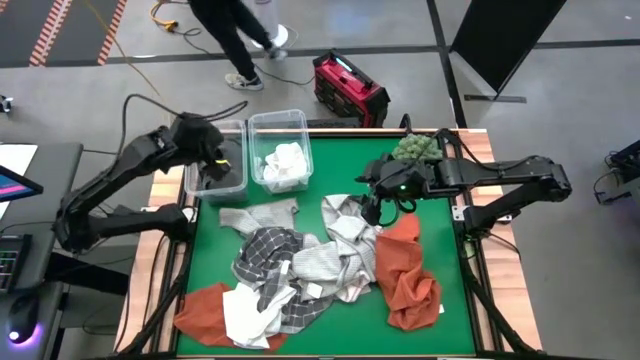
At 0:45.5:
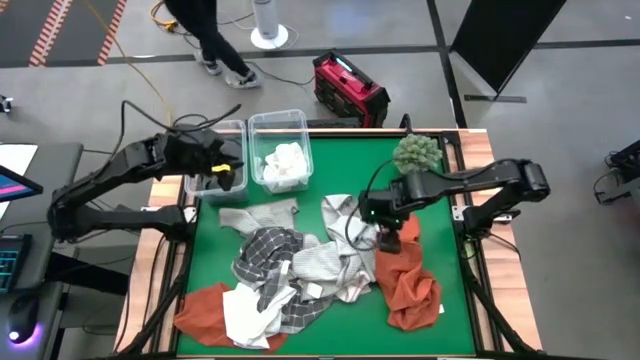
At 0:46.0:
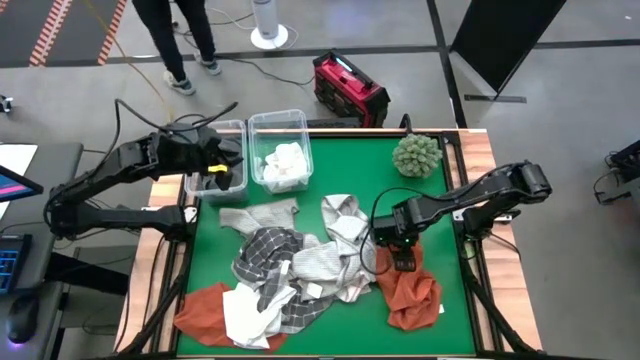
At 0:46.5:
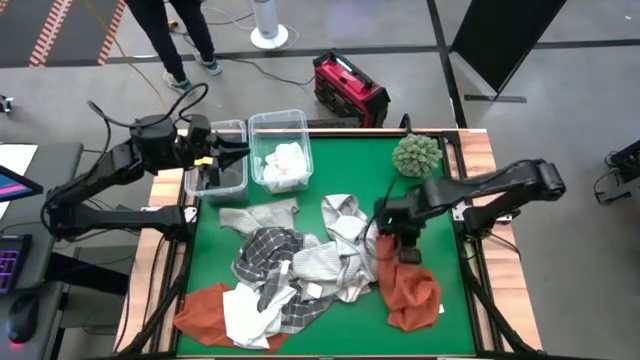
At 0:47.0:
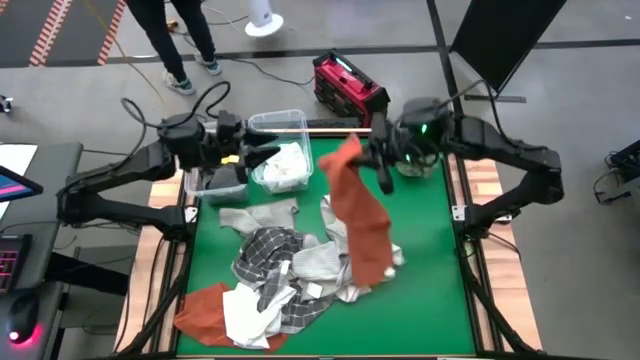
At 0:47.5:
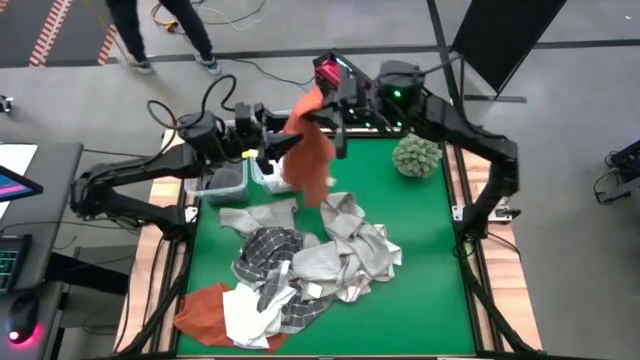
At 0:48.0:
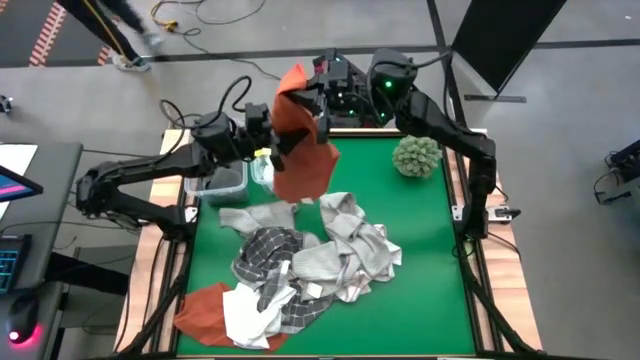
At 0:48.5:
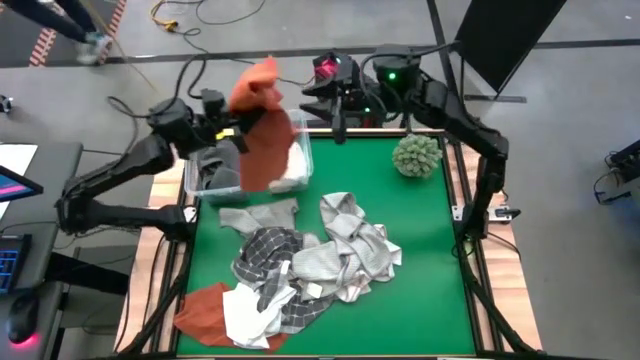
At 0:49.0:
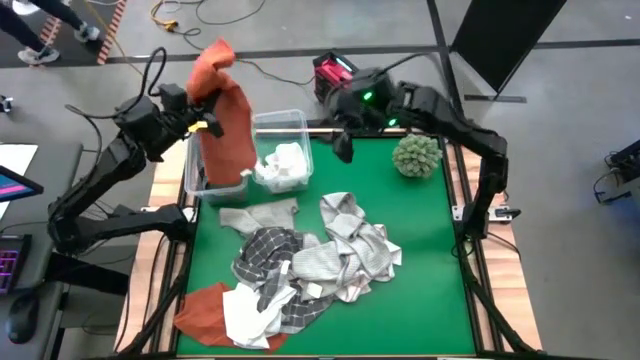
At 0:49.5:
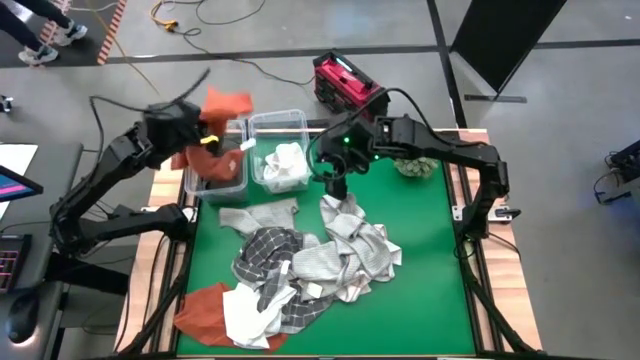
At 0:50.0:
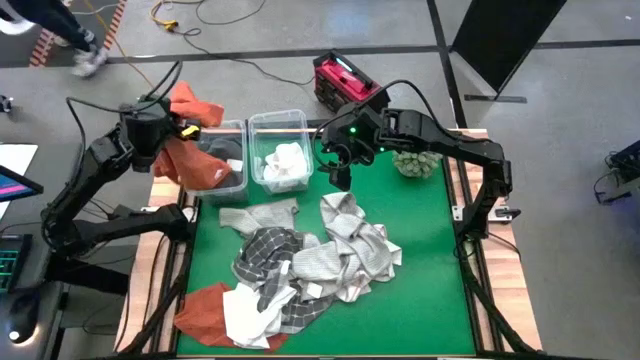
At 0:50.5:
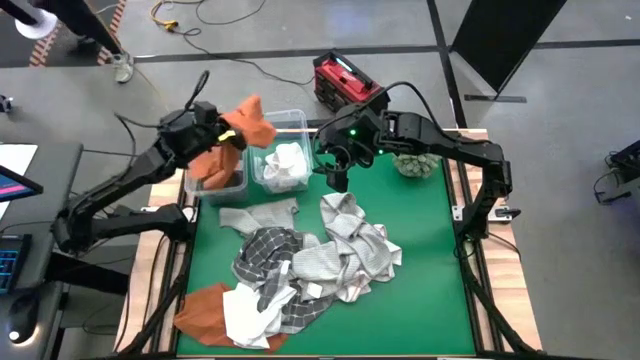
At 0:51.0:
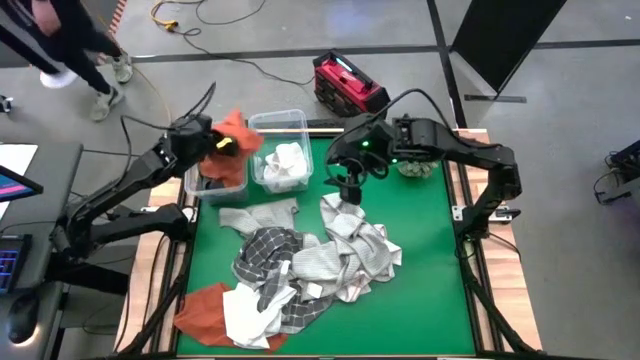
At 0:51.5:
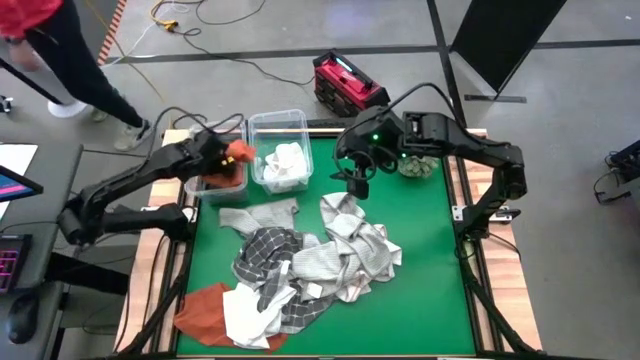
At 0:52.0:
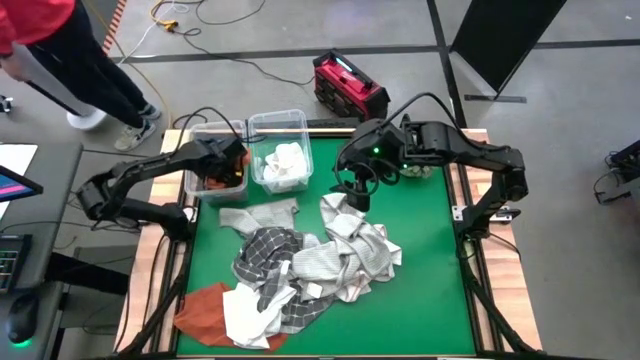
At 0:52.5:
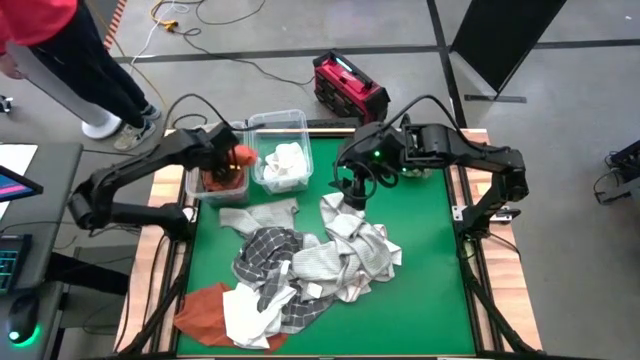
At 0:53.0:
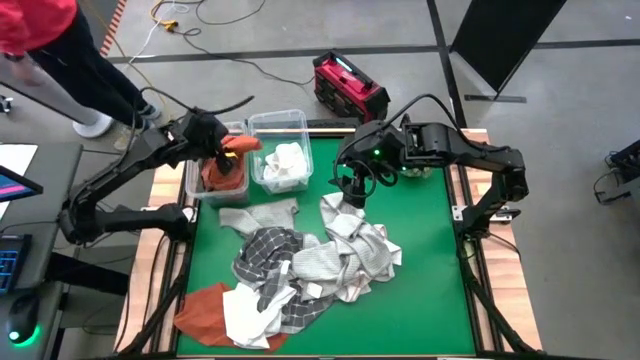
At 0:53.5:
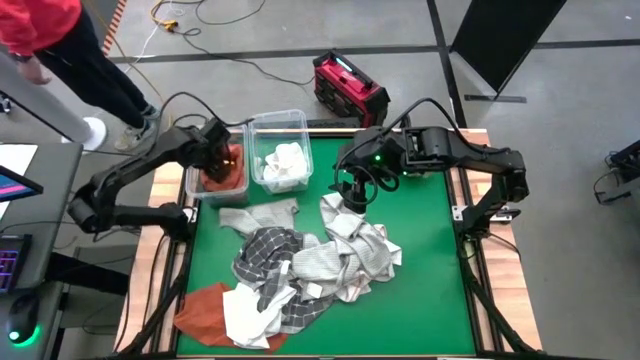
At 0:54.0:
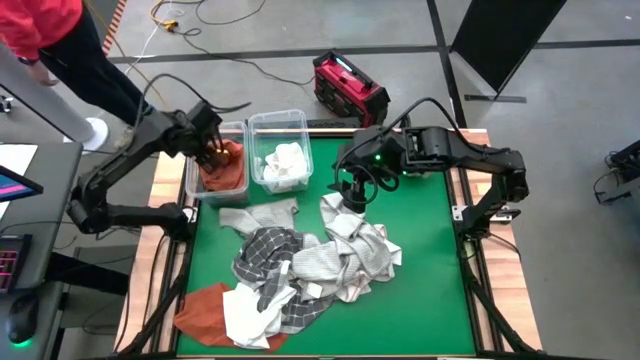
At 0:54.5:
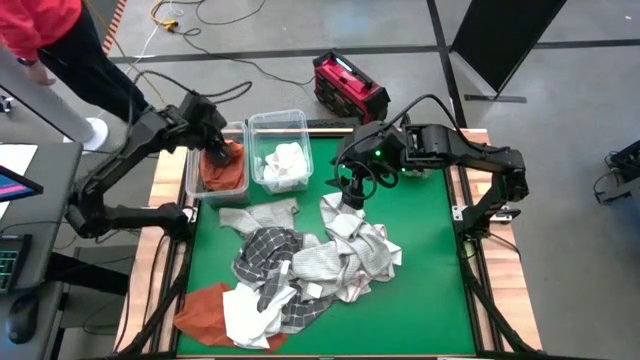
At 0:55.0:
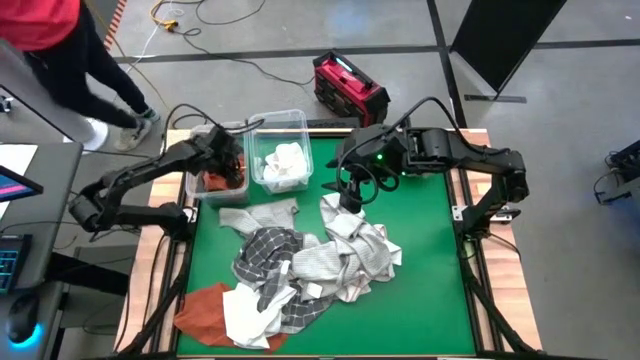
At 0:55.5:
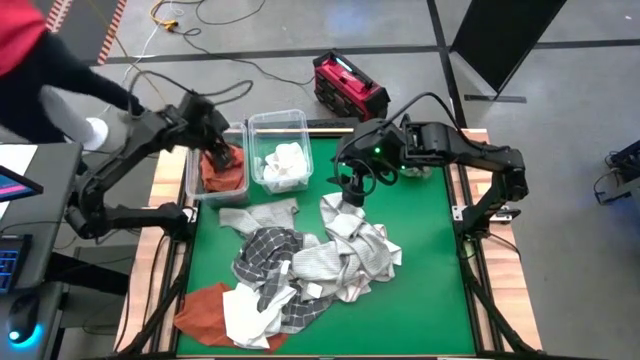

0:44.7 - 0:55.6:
Task: Sort towels by color in basket
Put the orange towel into the left transparent bin

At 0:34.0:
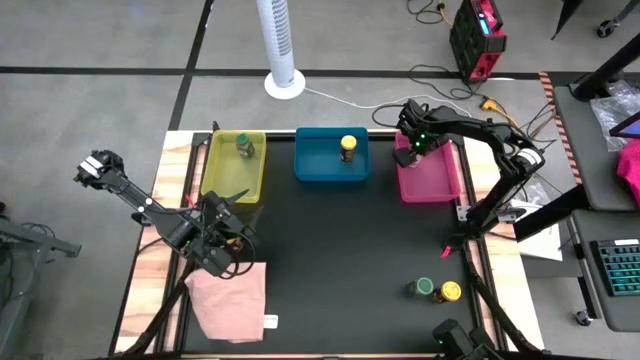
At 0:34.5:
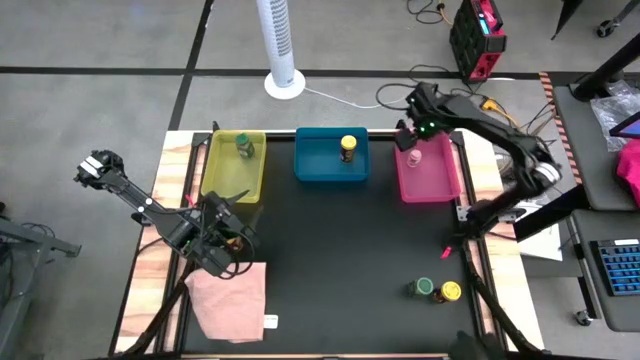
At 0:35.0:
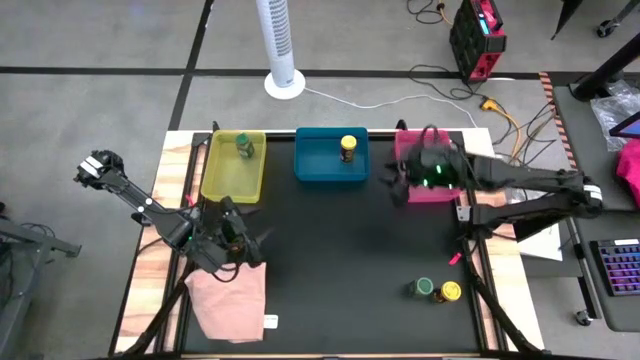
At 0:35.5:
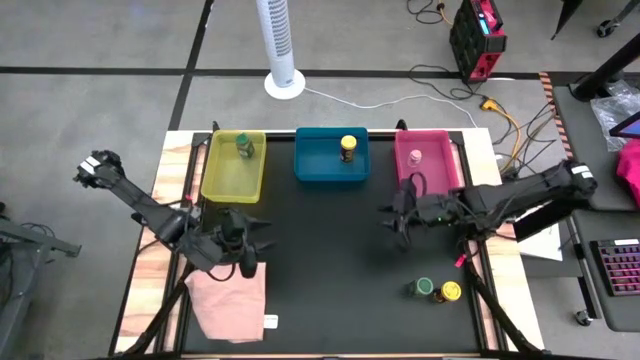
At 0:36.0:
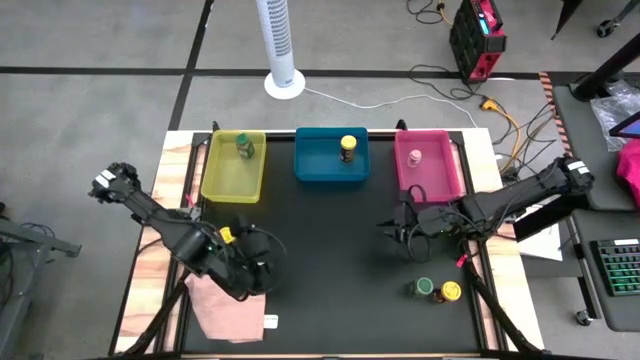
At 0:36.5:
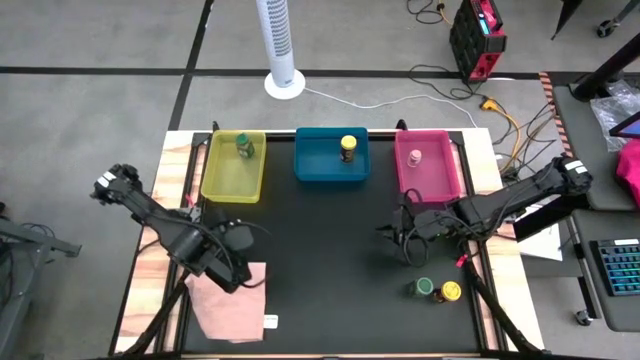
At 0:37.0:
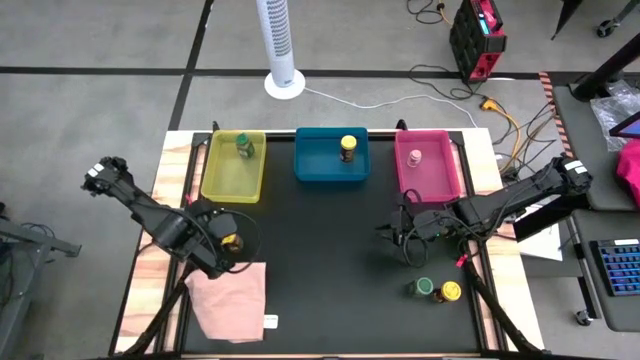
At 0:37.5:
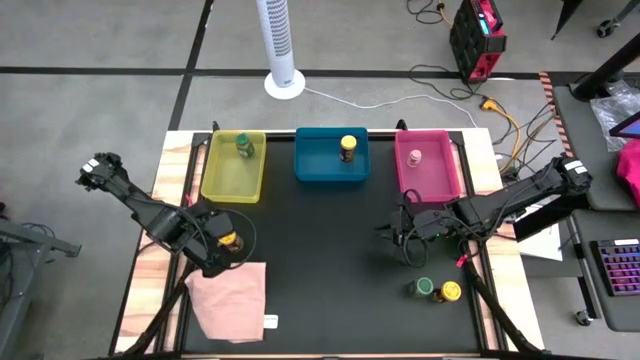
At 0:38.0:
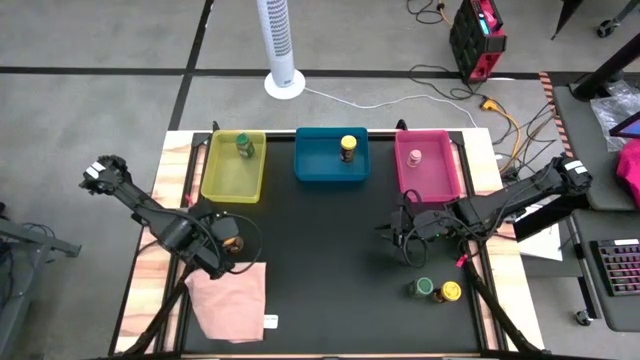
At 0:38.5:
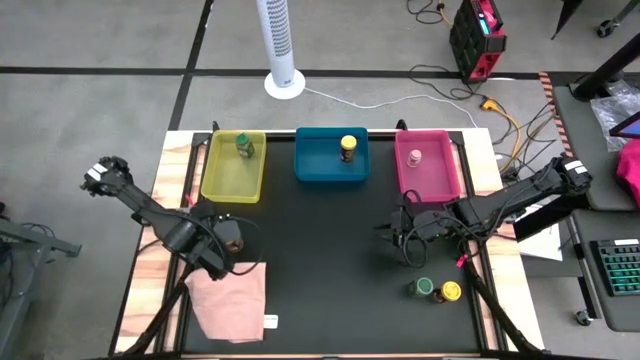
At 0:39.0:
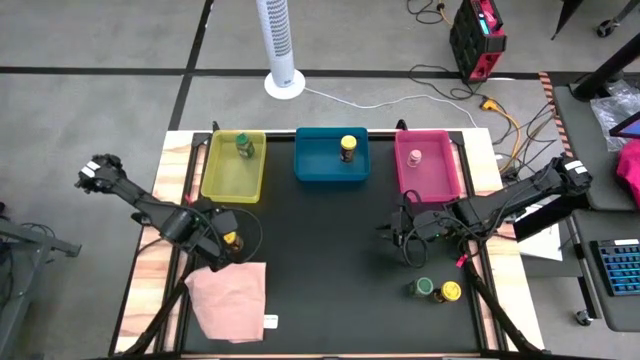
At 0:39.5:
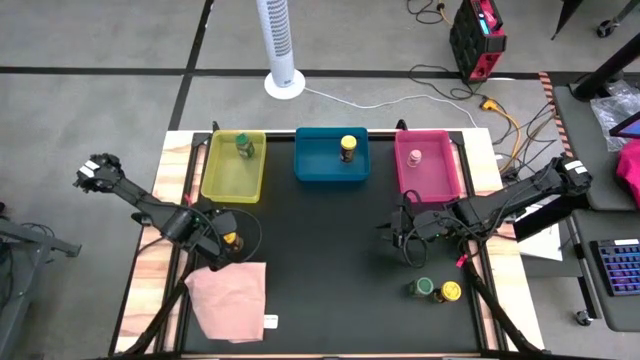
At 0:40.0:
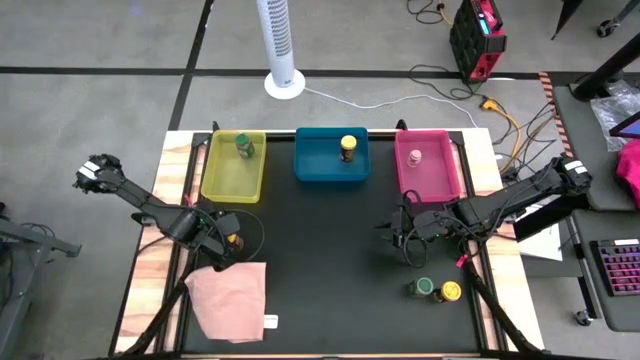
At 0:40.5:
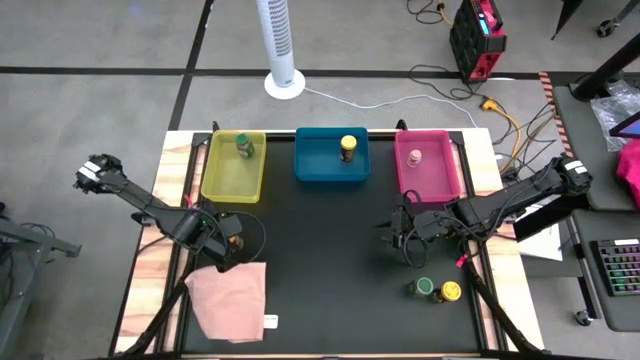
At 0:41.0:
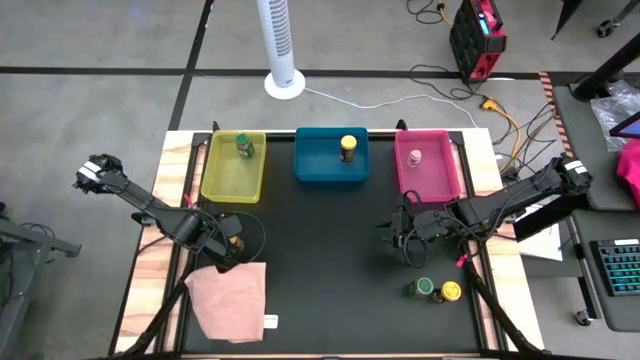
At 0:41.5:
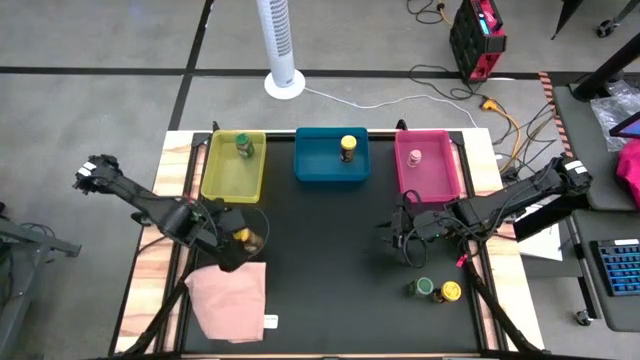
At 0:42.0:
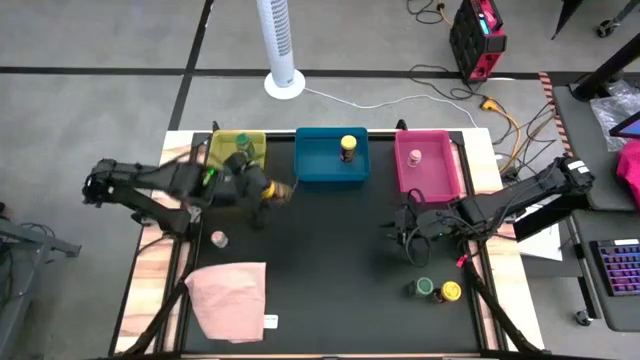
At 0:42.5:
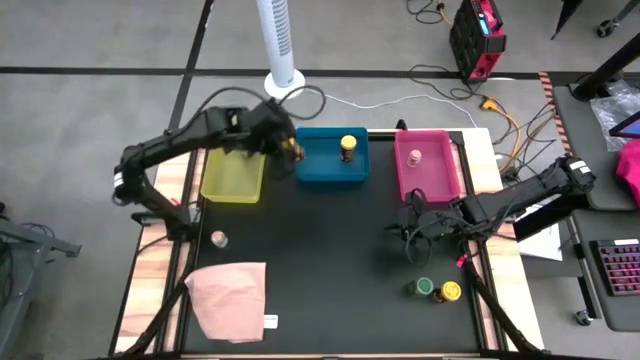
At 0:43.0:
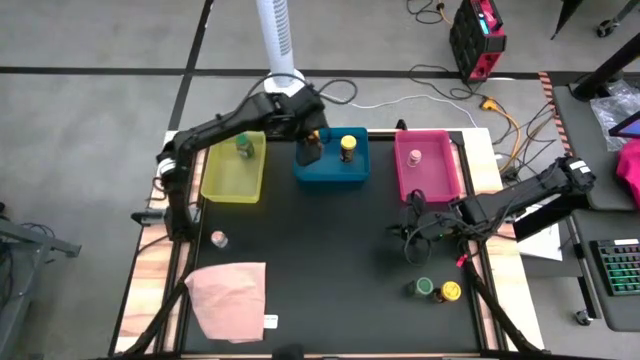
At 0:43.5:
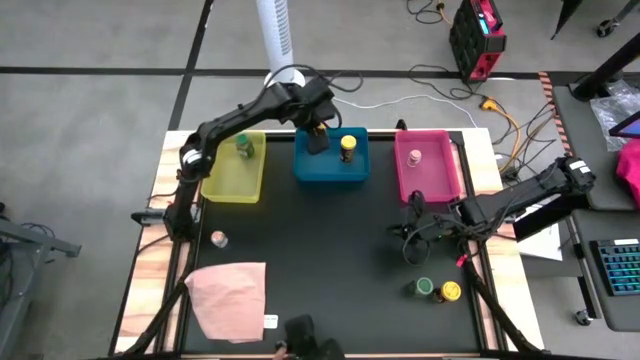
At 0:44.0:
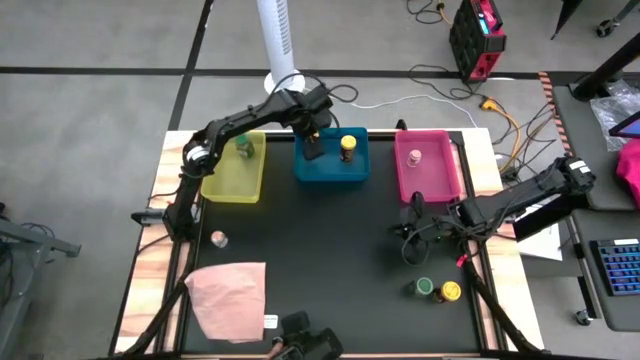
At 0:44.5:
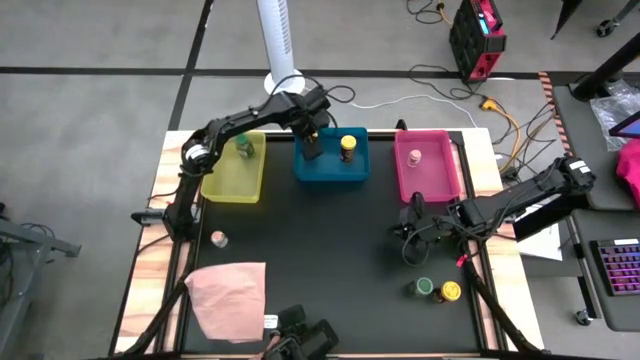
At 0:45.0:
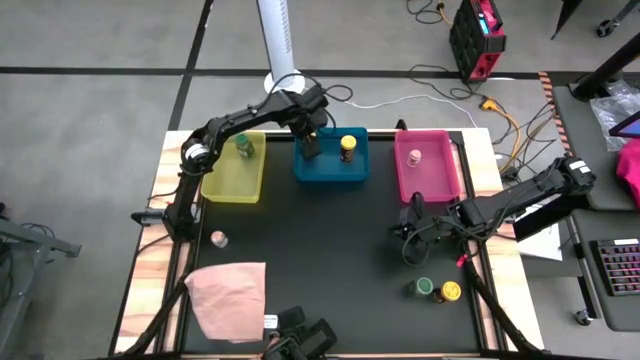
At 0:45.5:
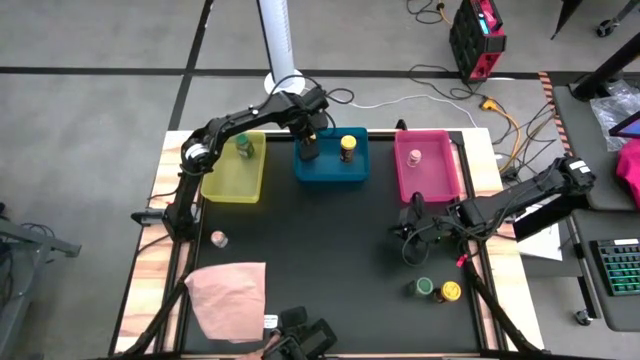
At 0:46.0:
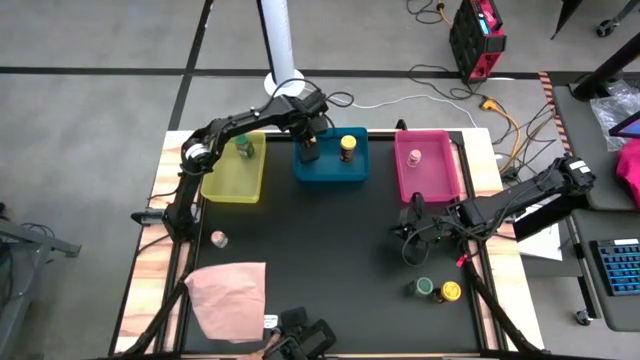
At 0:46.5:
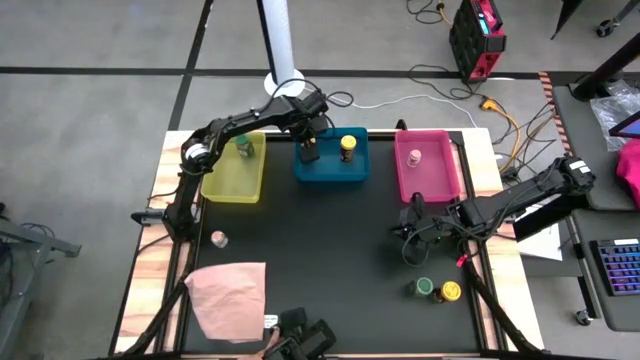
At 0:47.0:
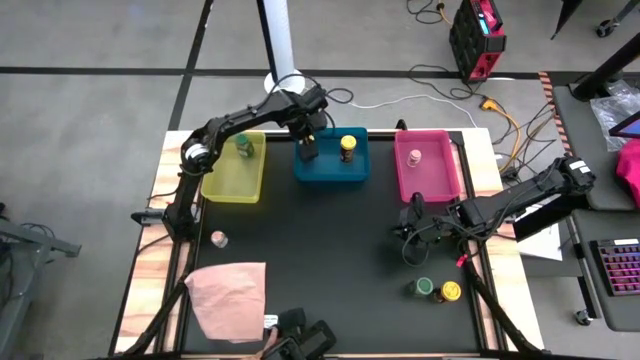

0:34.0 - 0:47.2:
Task: Sort spices by type
Put the left yellow seasoning bottle into the blue bin
